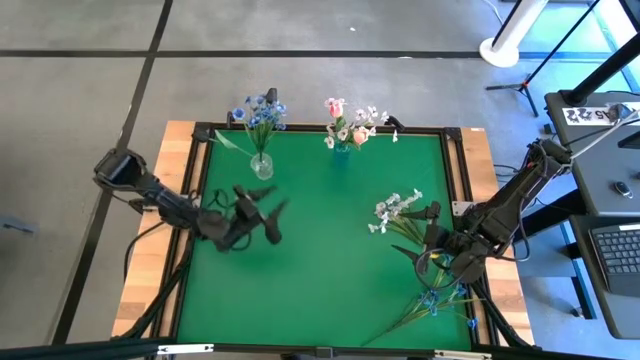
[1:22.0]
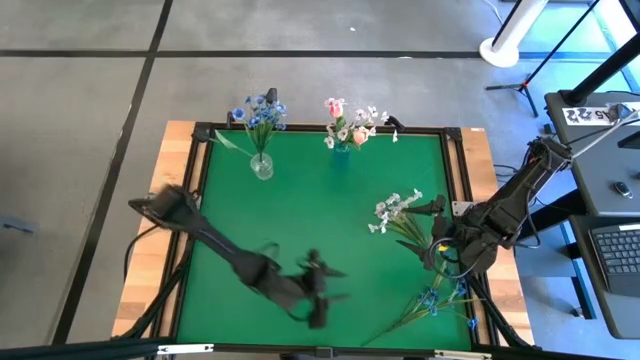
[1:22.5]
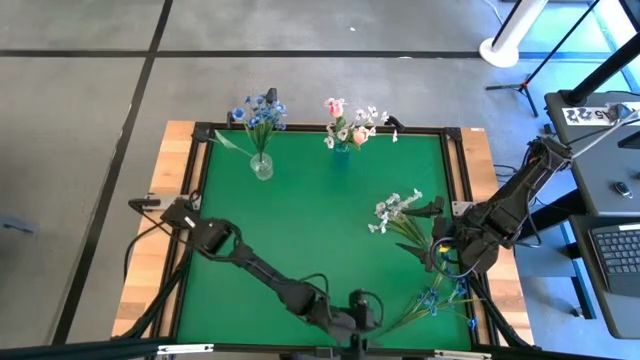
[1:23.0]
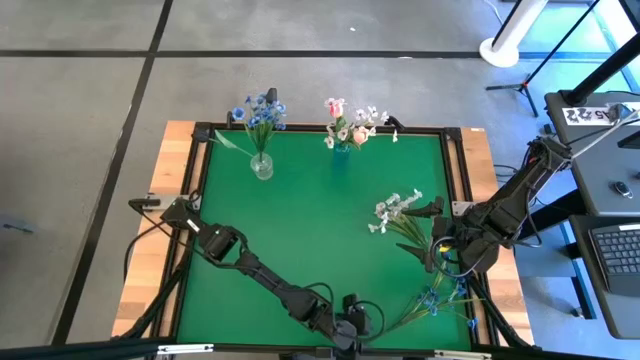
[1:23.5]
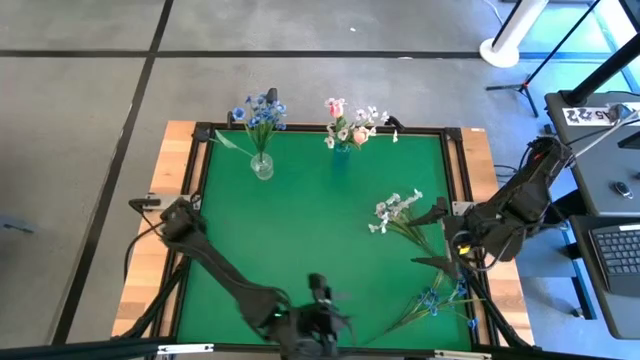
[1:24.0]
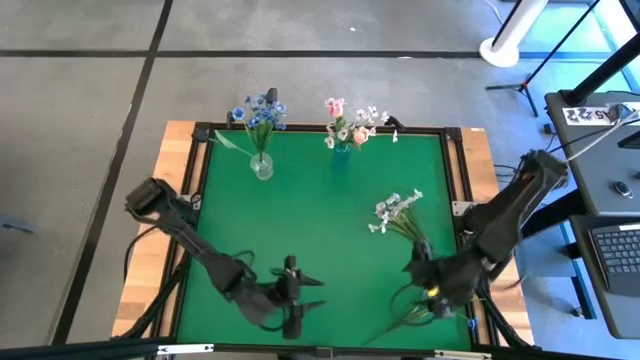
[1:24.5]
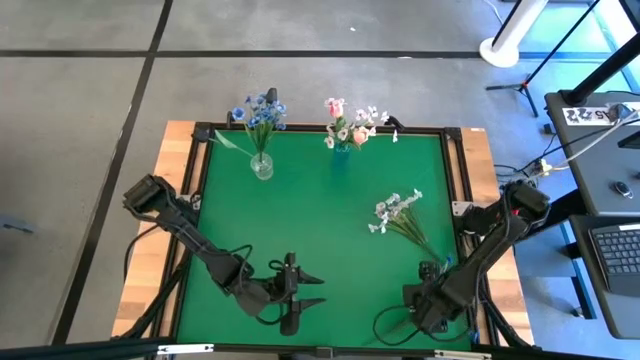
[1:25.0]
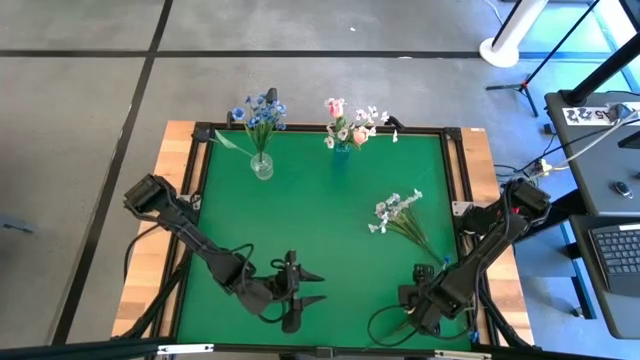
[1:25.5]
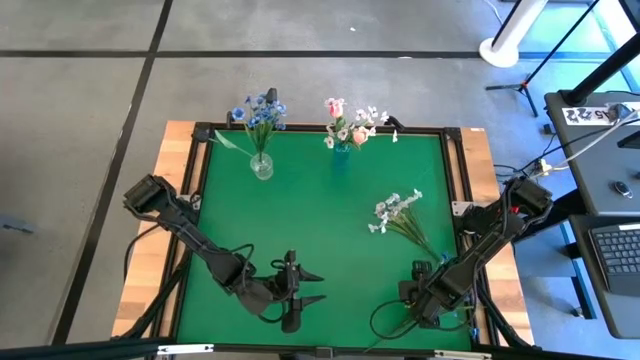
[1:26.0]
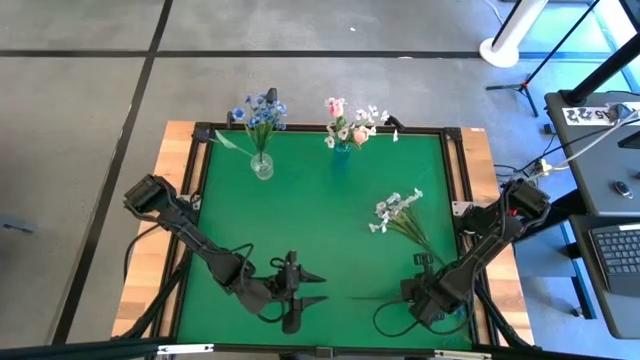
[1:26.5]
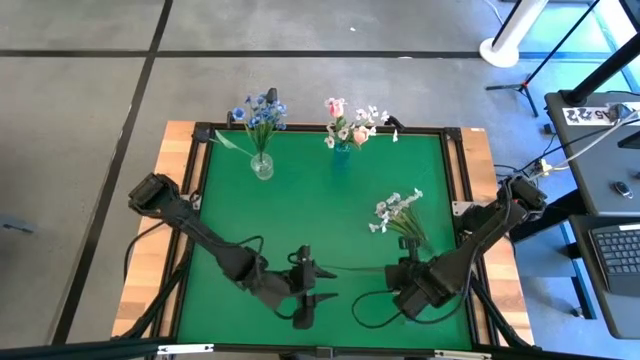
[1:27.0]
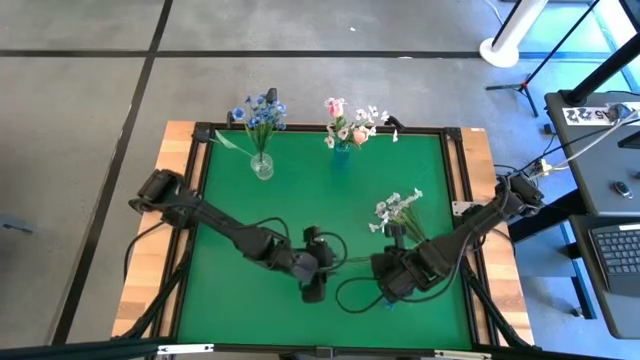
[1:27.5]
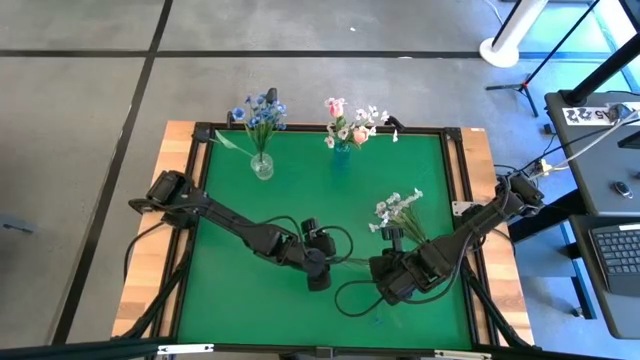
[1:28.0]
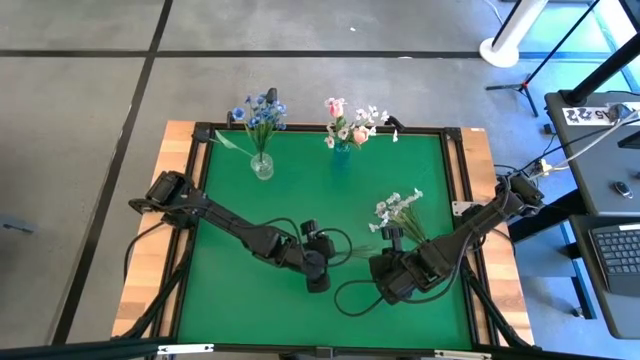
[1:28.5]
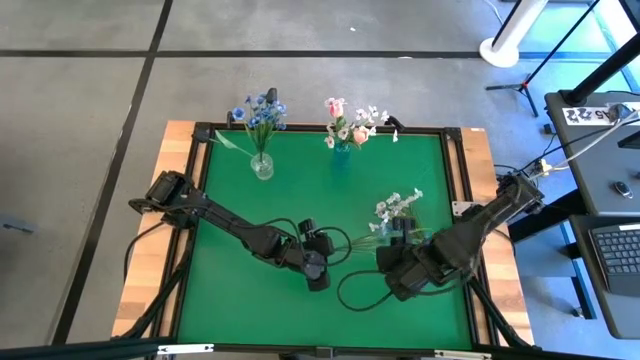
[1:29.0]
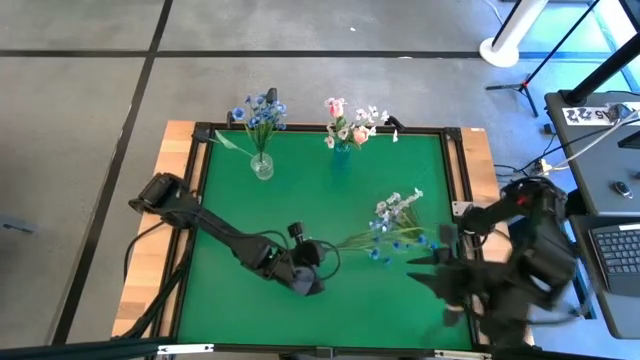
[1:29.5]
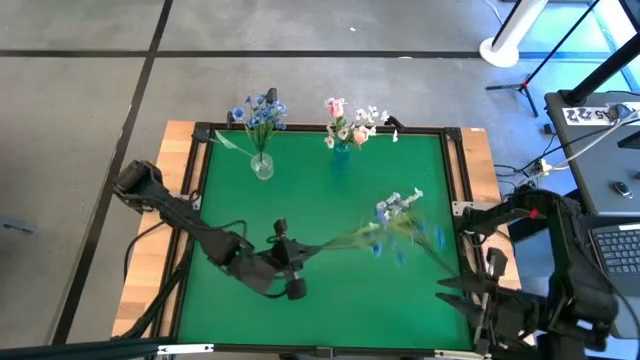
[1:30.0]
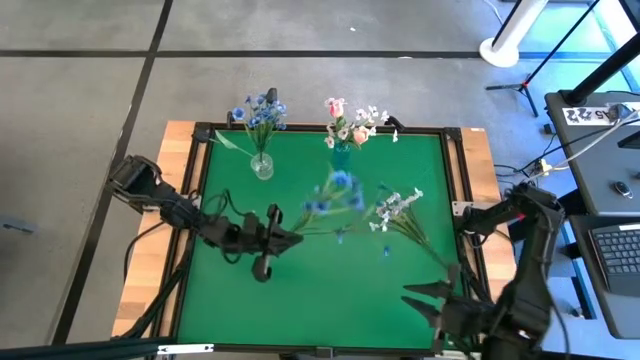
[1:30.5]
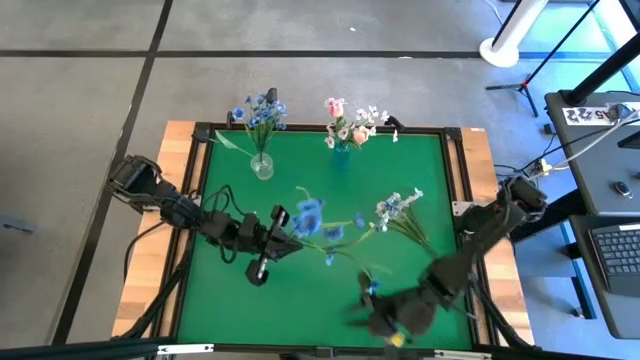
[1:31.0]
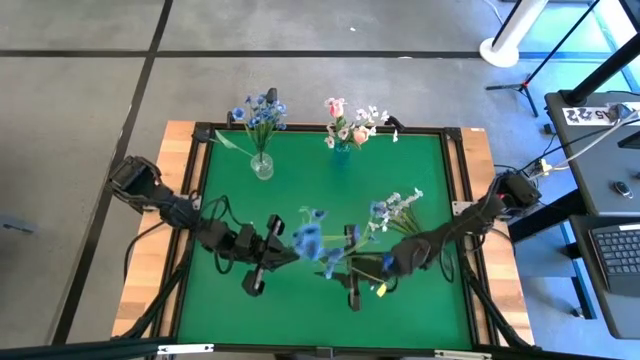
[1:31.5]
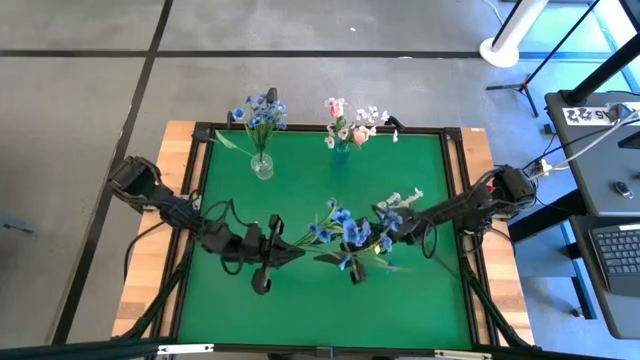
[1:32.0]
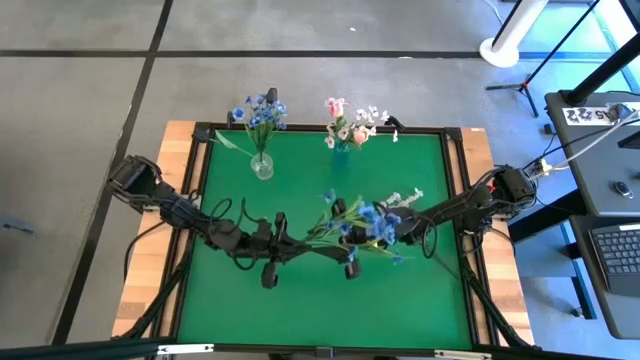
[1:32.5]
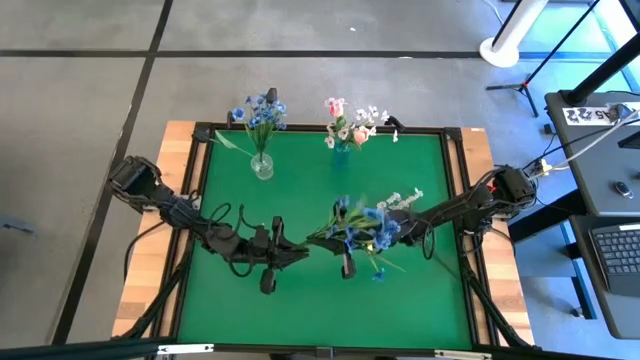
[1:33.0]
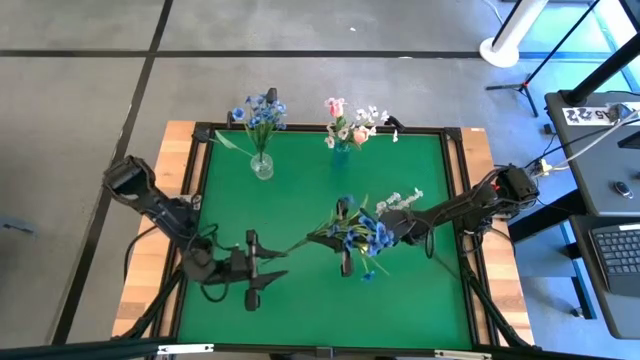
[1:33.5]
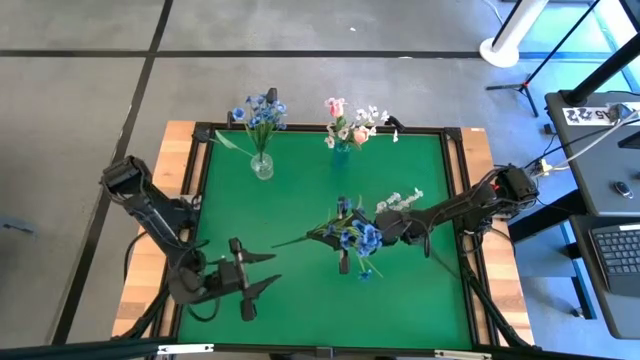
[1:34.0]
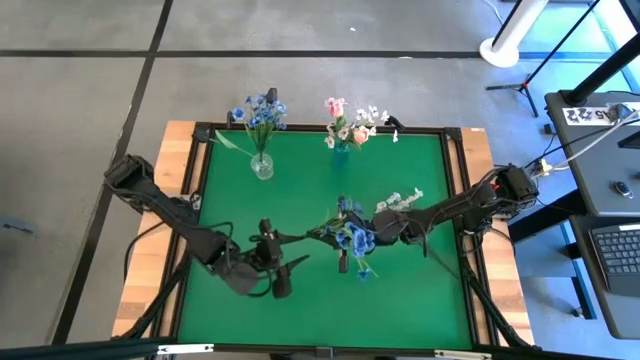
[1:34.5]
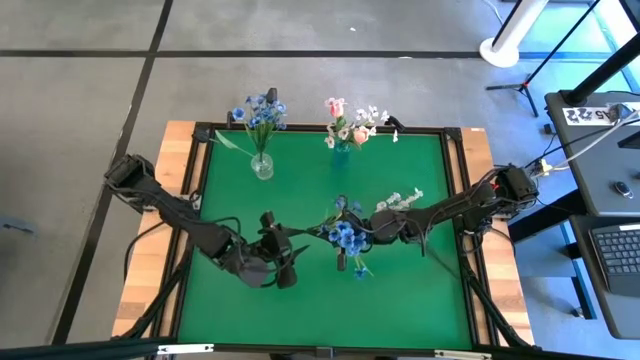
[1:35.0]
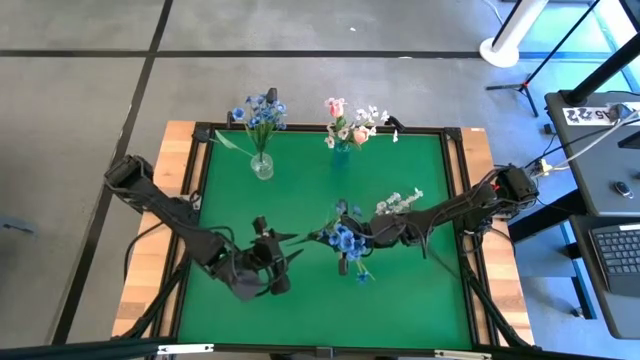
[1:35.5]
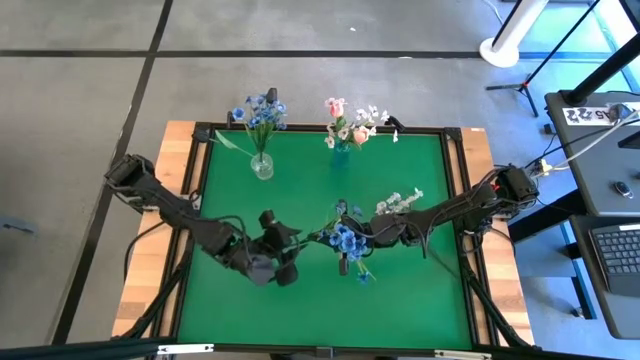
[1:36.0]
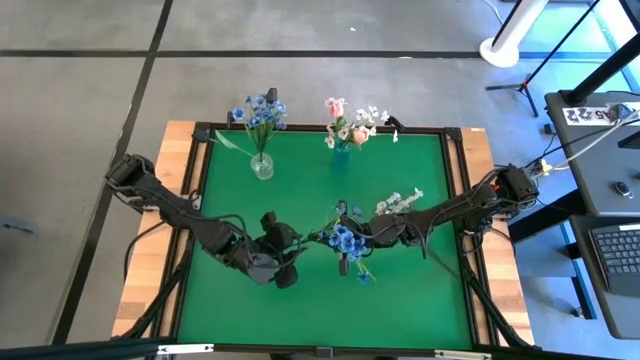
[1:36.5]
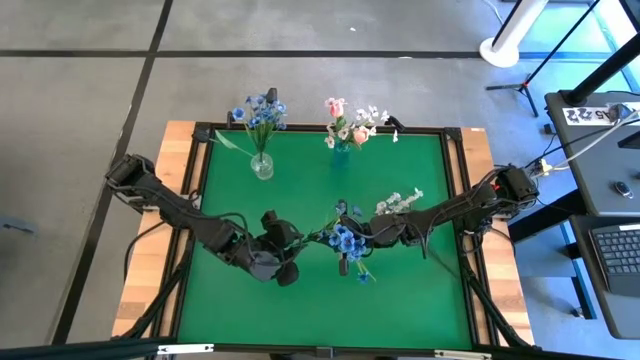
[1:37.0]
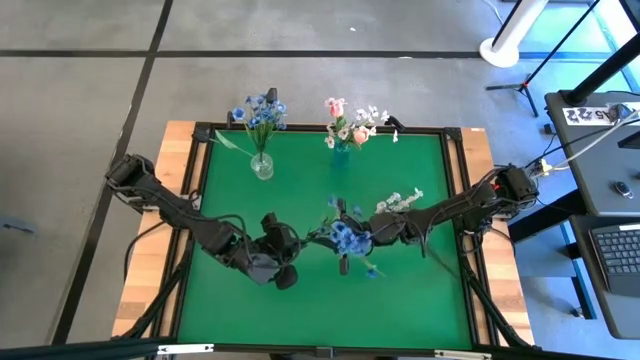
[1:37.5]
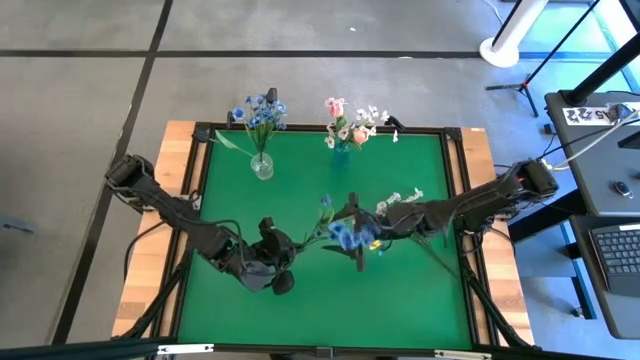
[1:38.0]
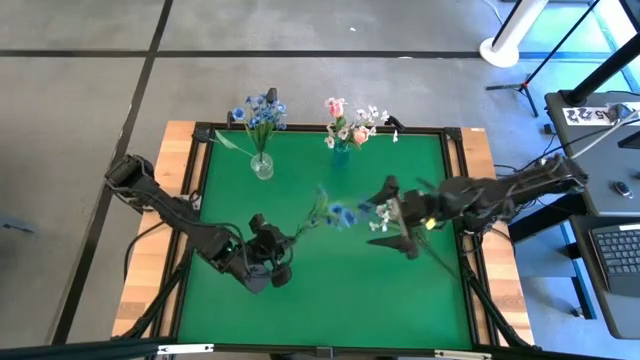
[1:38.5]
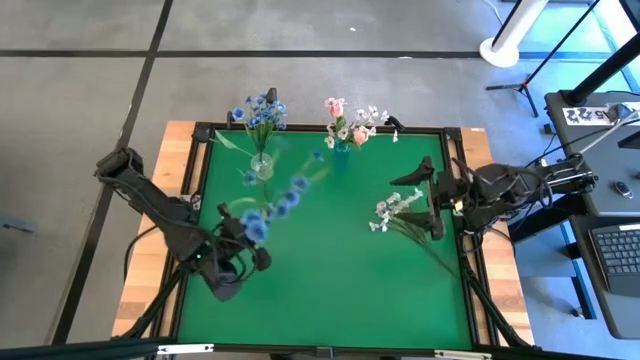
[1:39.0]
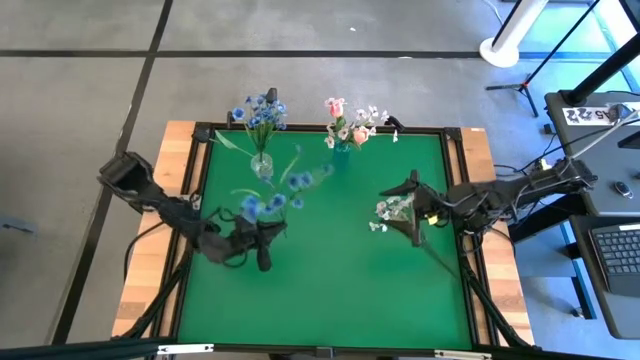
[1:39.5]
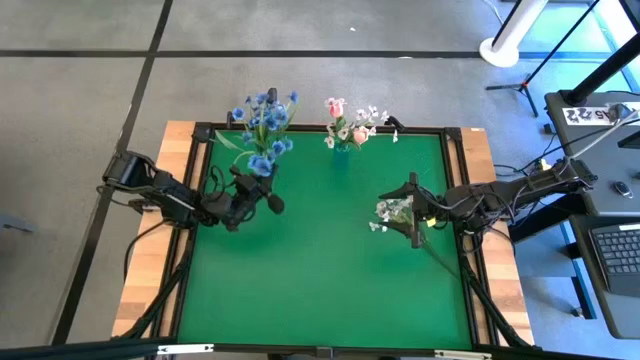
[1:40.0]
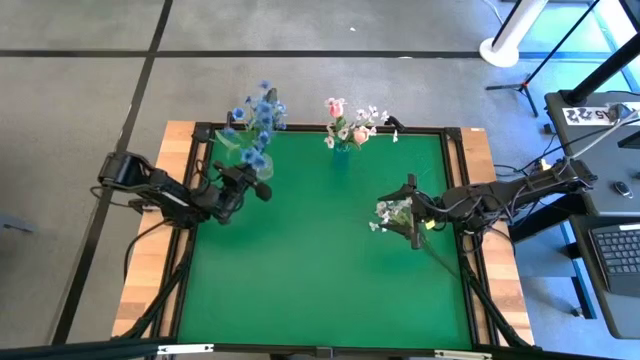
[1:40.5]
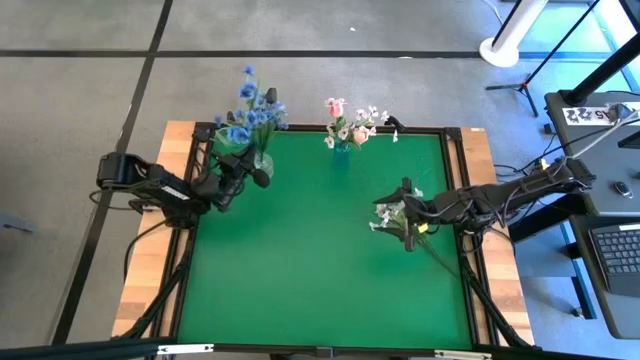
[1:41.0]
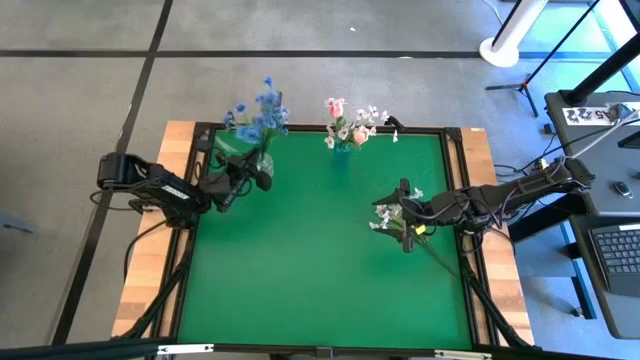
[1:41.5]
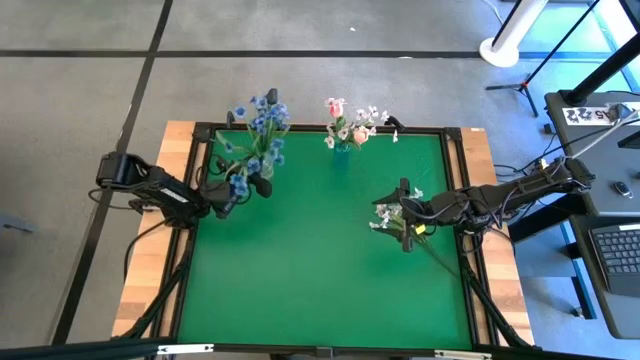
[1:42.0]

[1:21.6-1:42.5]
Task: Sort flowers into vase by color
Put the blue flowers into the transparent vase

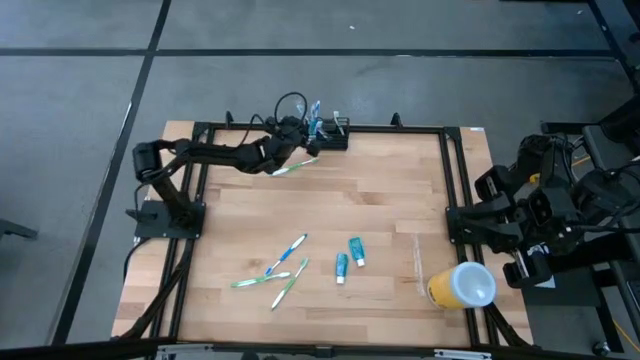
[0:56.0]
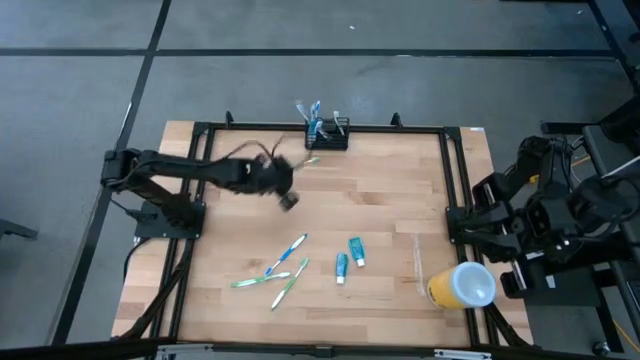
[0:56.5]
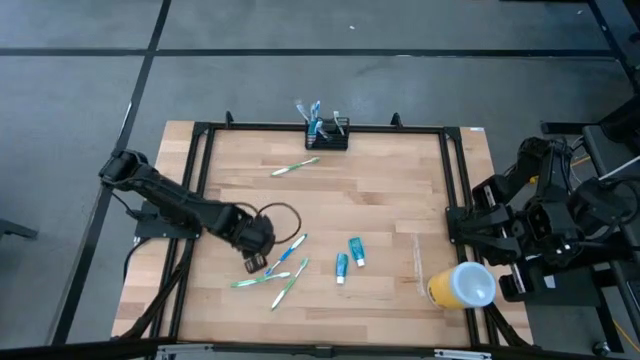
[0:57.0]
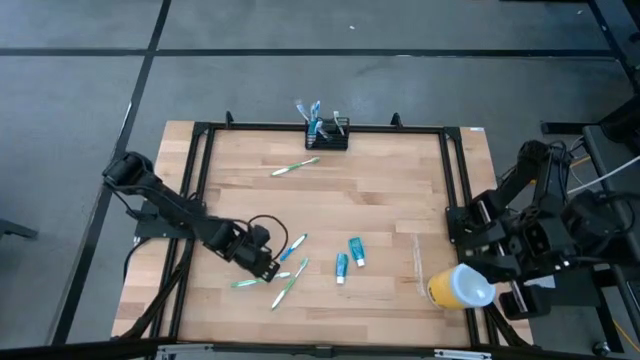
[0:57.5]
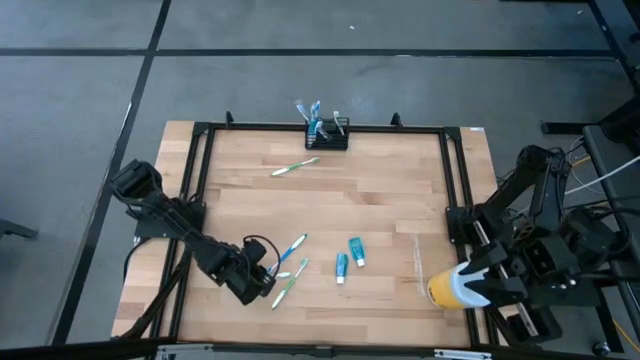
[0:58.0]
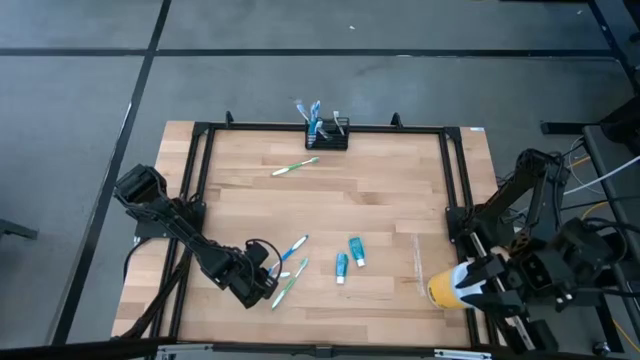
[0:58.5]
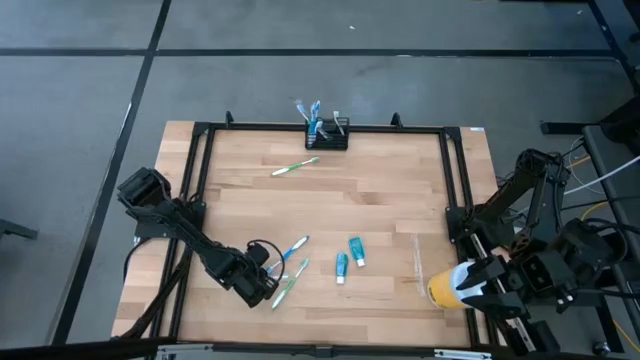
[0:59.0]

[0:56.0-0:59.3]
Task: Pick & Place toothbrushing station
Put the blue toothbrush into the wire organizer
